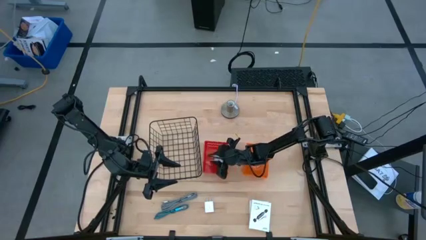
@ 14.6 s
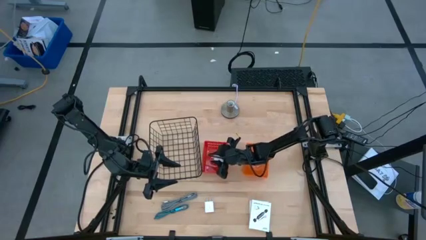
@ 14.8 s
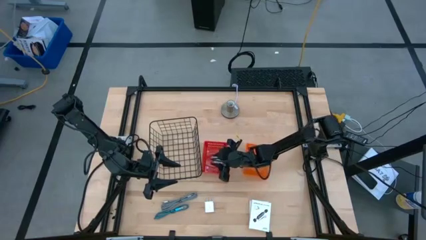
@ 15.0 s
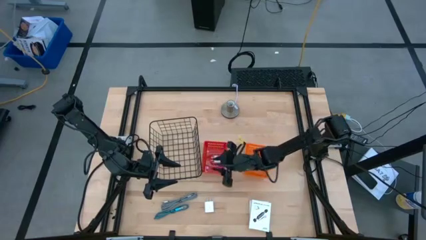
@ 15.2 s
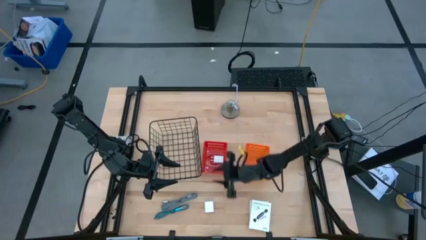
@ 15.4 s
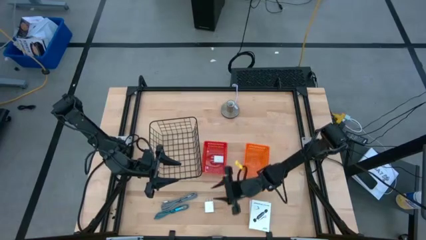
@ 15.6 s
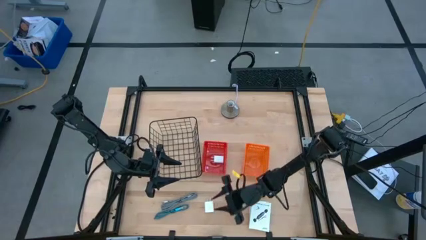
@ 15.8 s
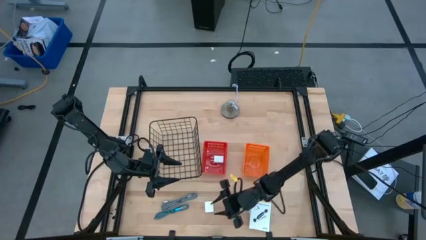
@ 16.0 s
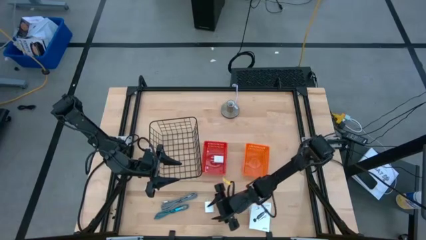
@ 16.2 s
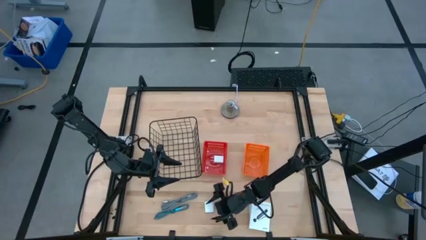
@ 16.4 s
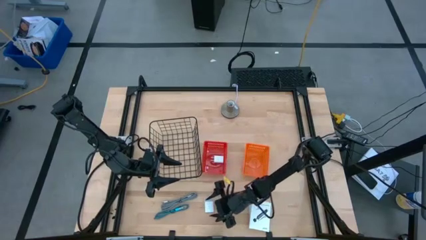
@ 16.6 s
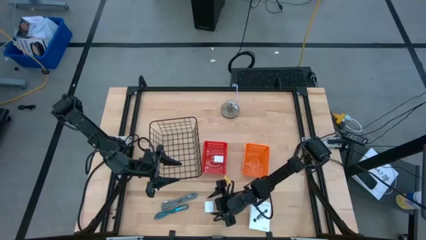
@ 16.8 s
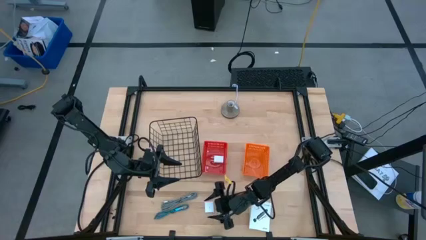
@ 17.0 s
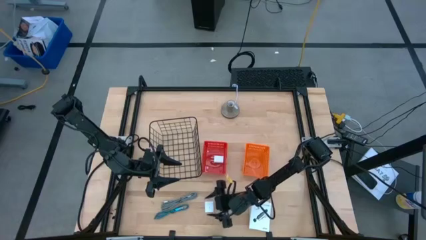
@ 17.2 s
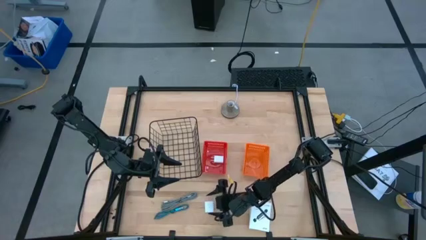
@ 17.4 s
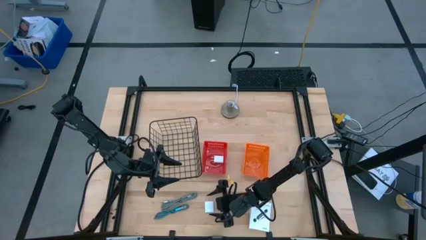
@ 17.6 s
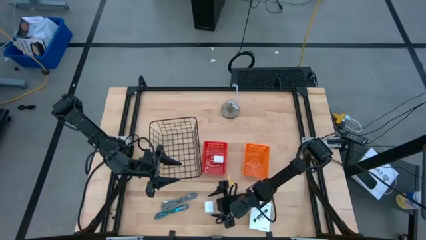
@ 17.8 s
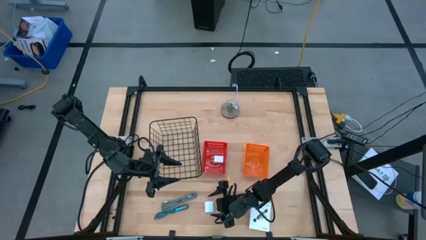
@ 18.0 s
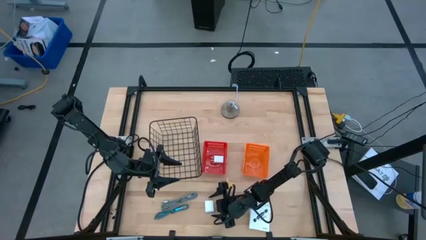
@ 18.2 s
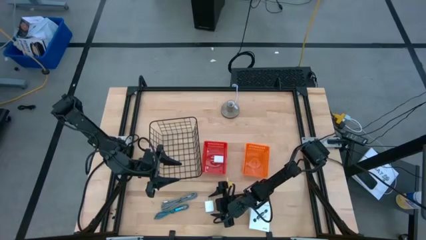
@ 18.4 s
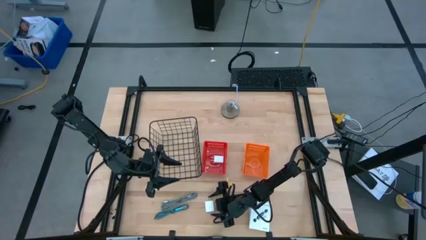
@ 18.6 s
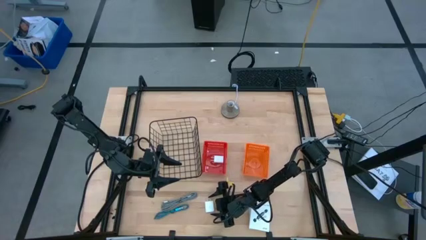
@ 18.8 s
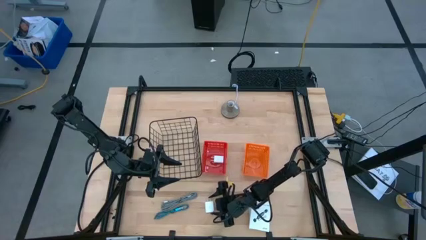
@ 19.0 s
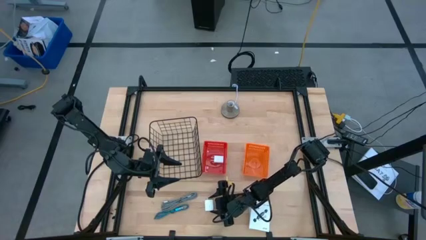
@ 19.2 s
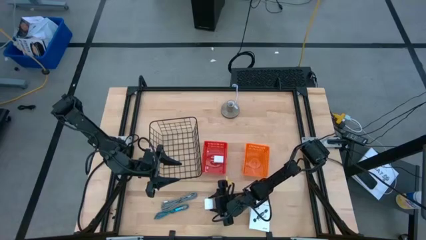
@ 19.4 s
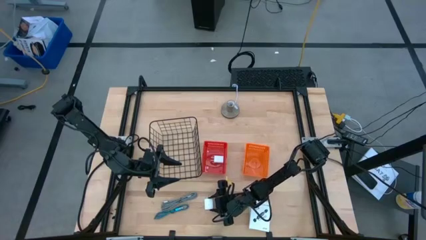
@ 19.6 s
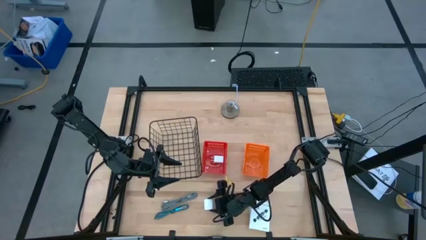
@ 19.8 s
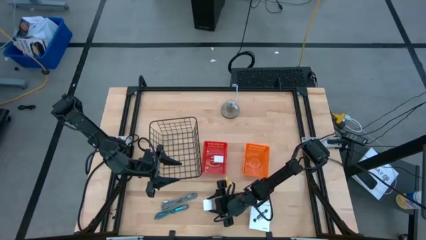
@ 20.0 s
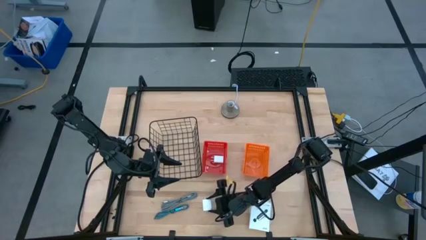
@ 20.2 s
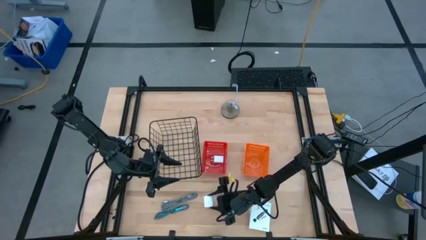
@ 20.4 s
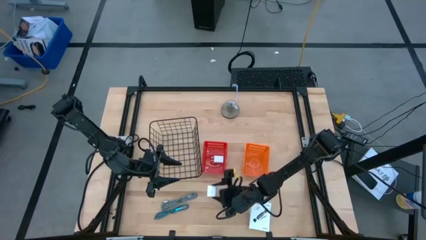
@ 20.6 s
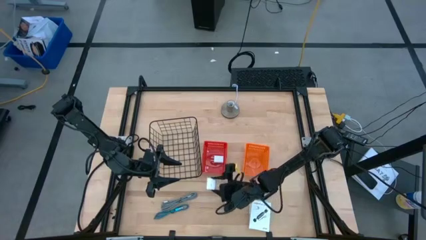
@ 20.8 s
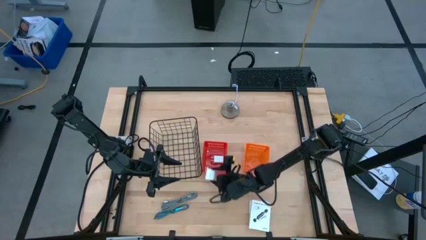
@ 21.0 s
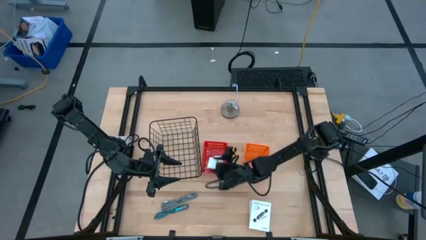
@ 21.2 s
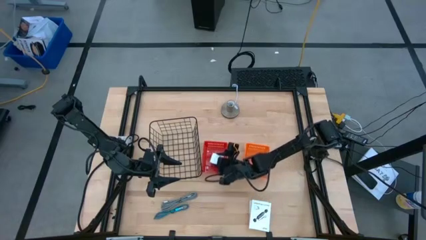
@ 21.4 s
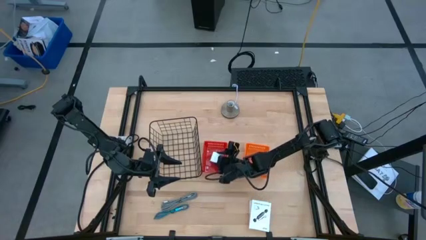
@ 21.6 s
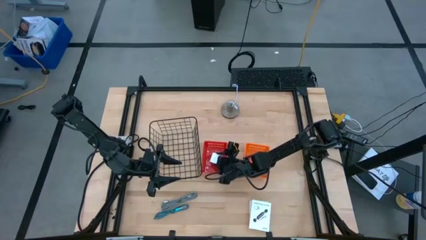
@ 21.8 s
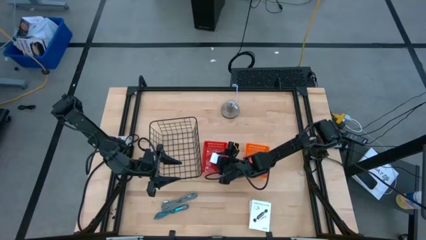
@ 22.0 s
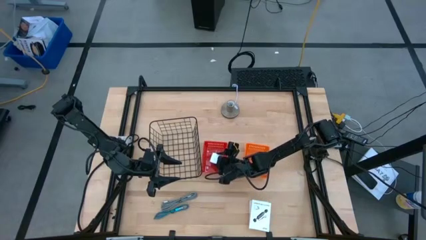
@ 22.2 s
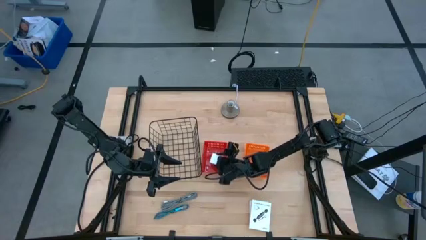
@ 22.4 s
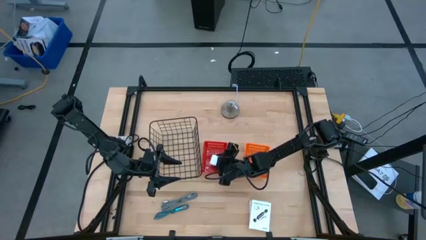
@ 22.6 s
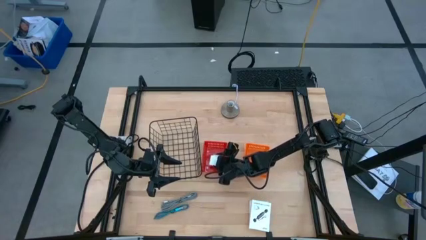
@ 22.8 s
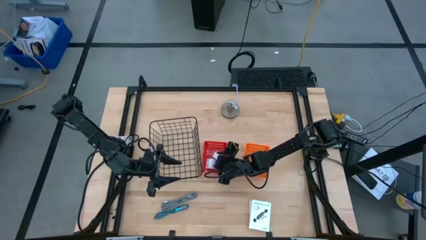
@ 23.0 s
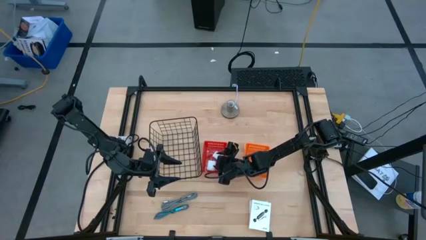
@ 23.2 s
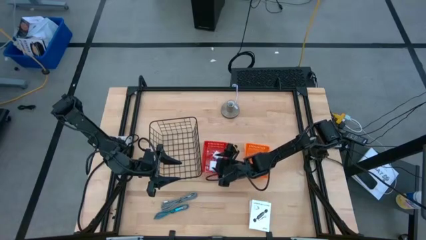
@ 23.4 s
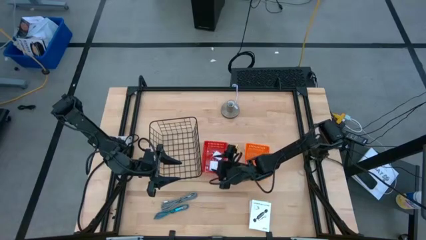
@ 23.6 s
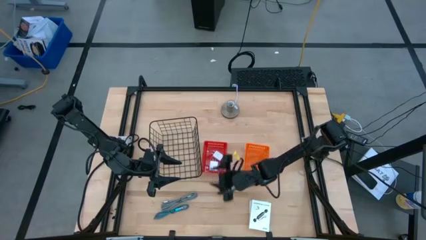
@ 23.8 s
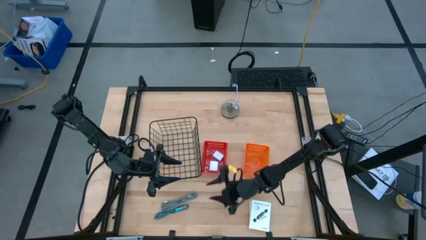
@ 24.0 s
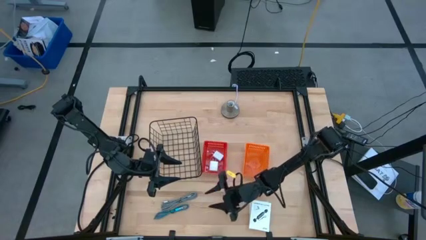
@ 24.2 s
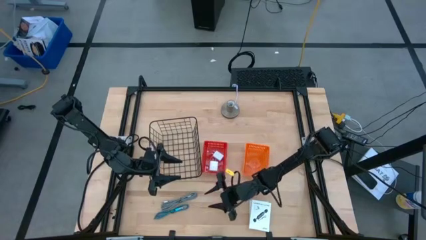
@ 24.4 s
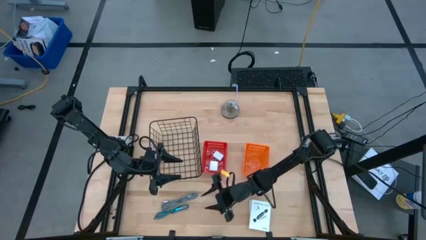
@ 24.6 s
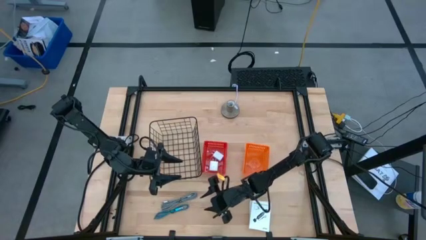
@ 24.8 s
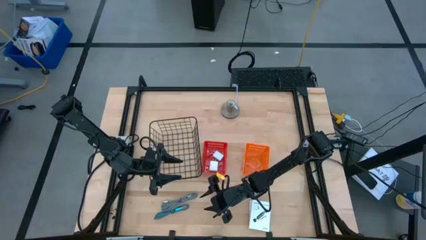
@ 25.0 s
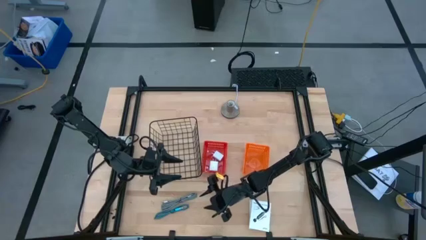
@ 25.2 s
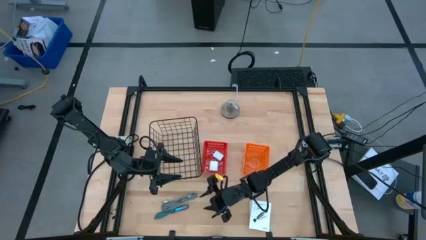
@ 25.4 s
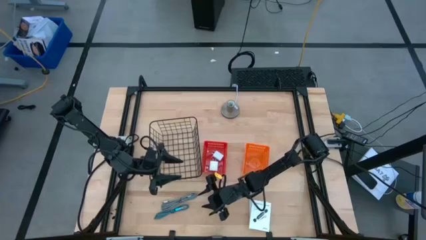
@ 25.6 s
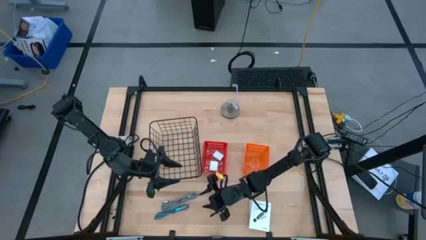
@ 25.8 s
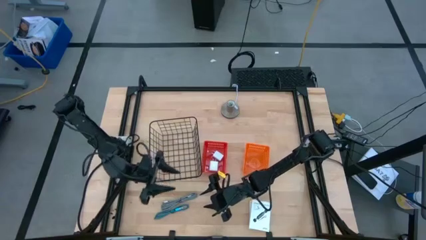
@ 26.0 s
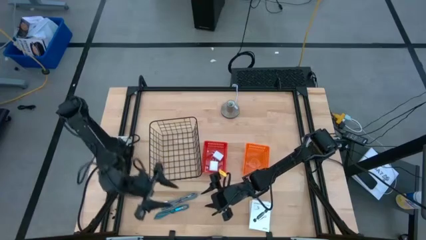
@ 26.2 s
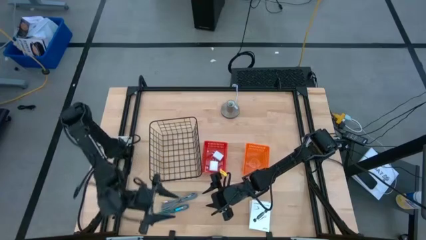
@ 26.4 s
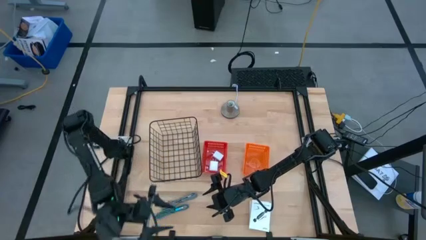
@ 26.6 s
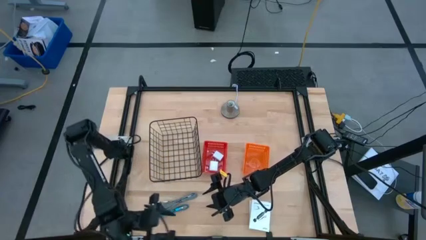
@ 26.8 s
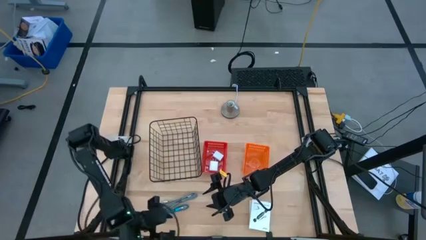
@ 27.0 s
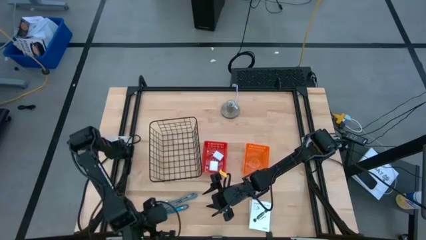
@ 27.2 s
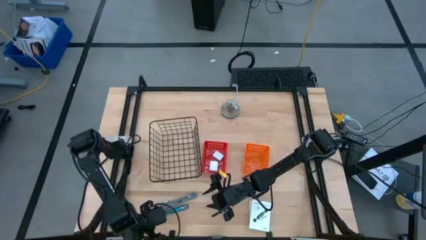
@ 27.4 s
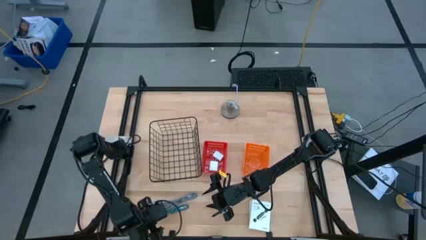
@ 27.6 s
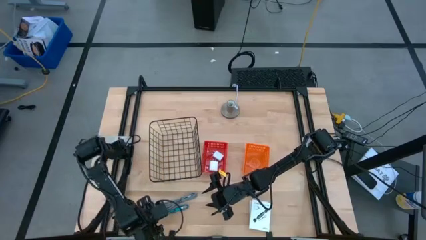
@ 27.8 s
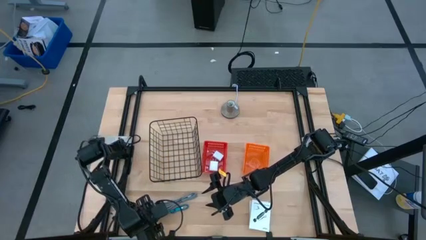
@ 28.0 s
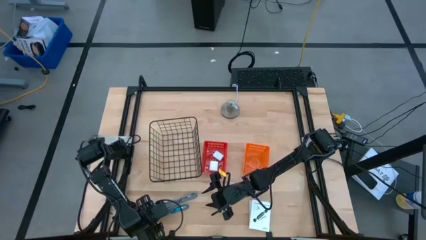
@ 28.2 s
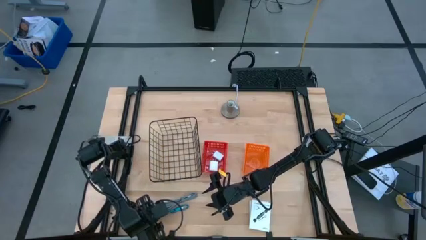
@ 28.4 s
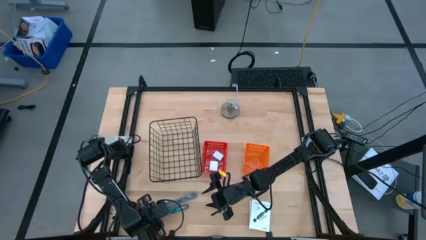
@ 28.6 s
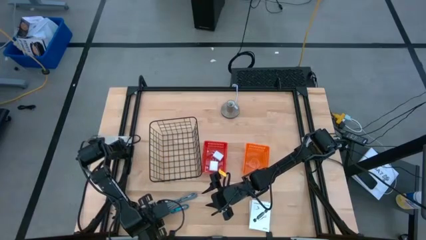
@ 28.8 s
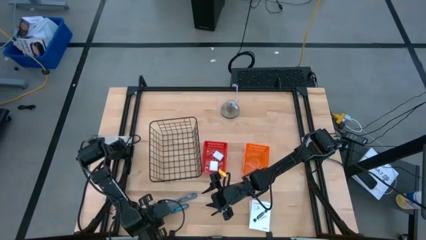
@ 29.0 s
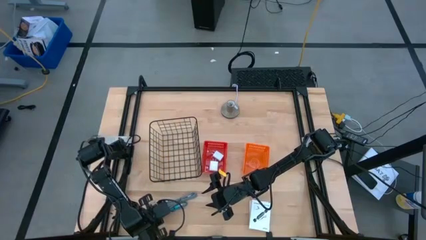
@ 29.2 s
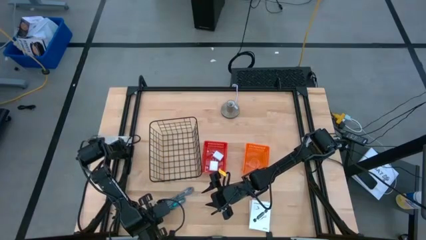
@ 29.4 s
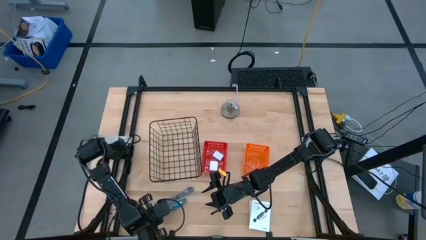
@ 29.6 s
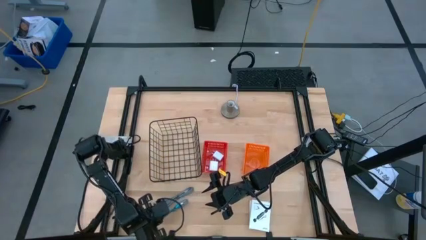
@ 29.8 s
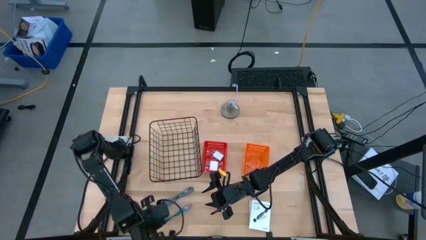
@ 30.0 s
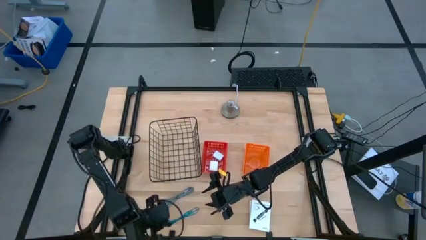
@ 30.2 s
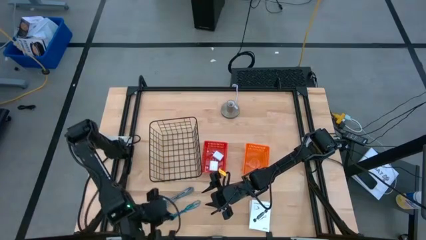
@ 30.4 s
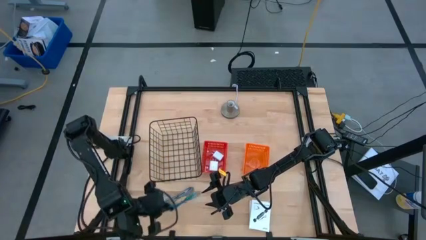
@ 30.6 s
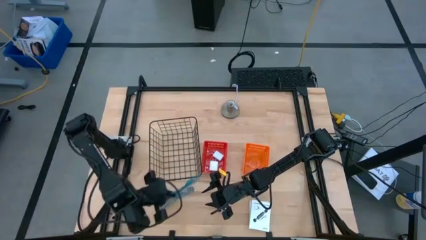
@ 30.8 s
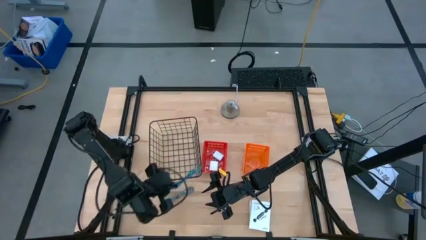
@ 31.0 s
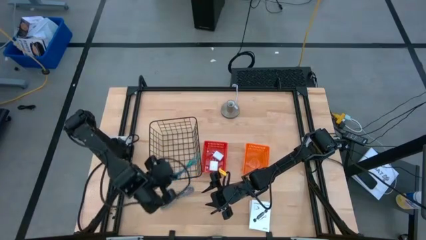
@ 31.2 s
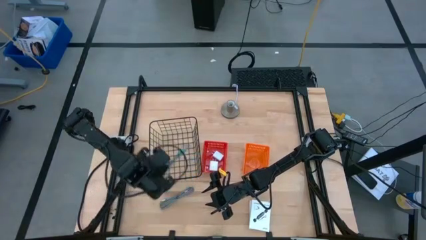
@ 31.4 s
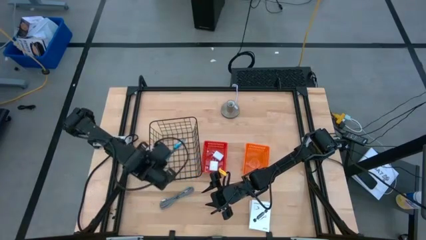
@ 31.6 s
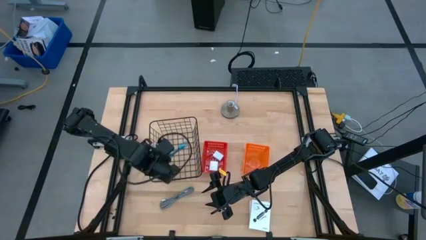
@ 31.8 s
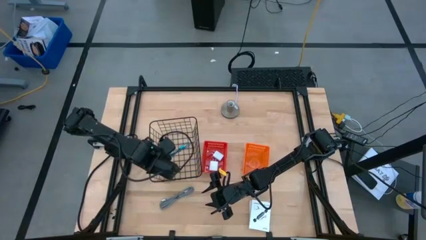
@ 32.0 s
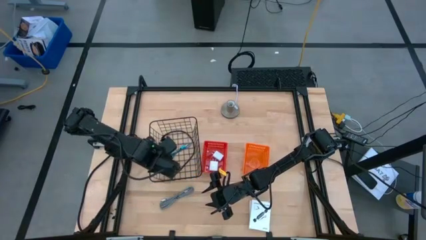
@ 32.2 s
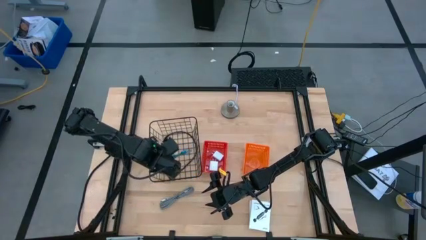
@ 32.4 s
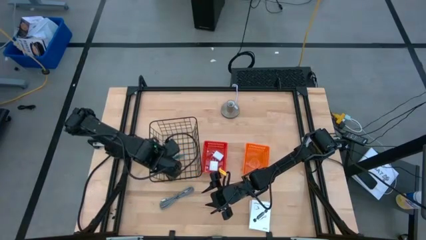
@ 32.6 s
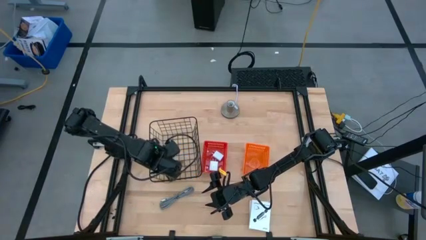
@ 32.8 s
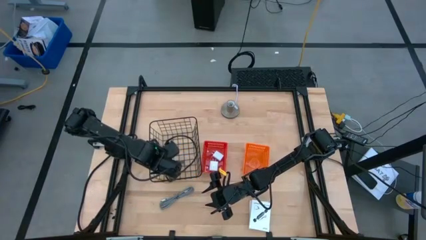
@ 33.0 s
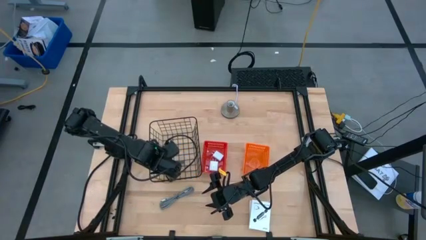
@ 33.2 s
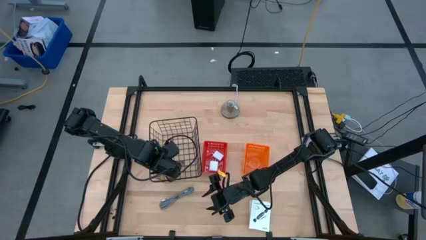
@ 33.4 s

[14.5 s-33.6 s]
Task: Pick and place items into bin
Put the blue charger cable into the black wire basket
